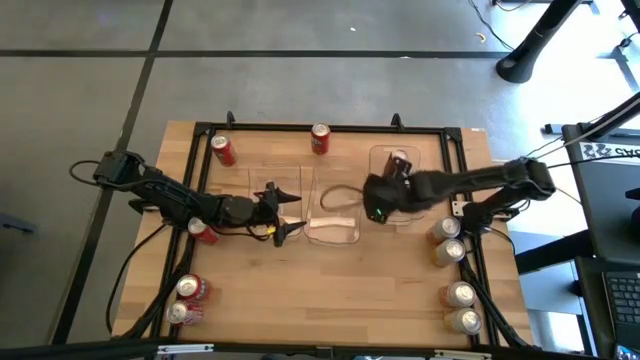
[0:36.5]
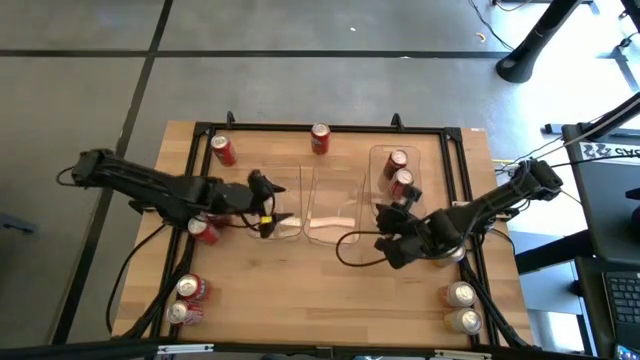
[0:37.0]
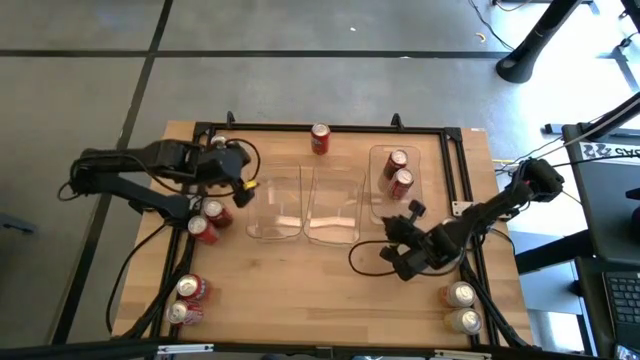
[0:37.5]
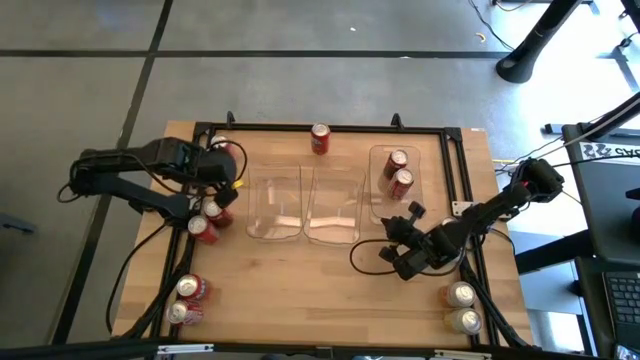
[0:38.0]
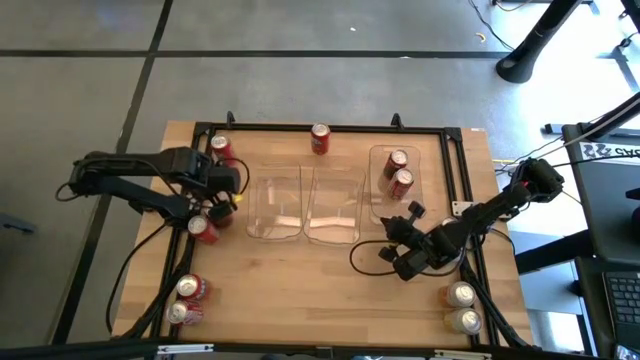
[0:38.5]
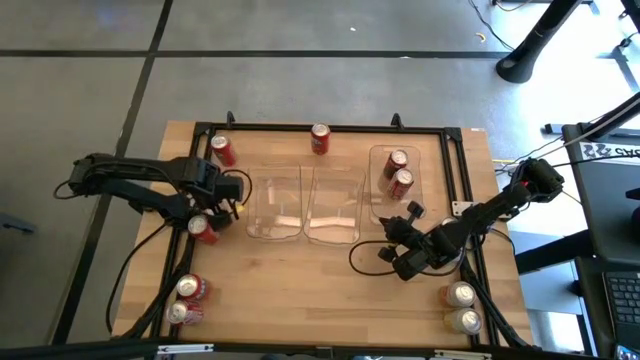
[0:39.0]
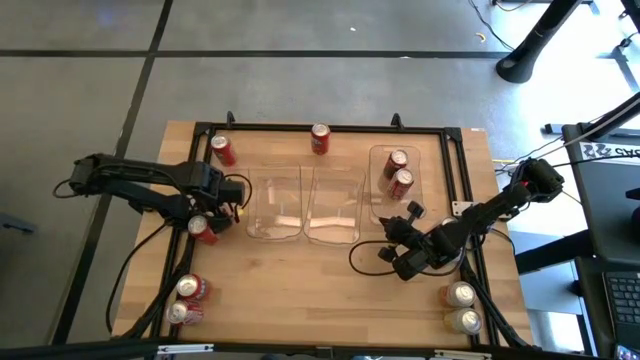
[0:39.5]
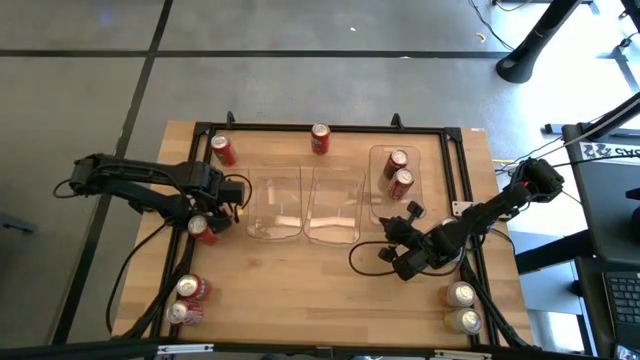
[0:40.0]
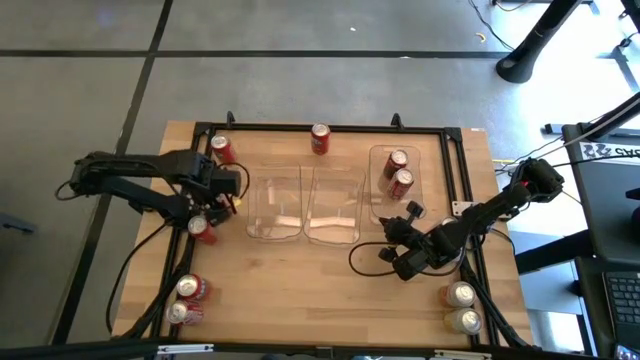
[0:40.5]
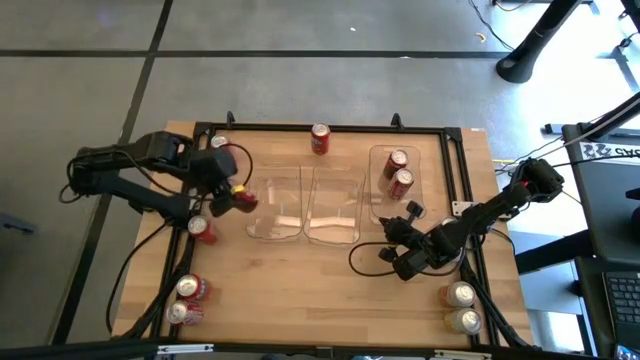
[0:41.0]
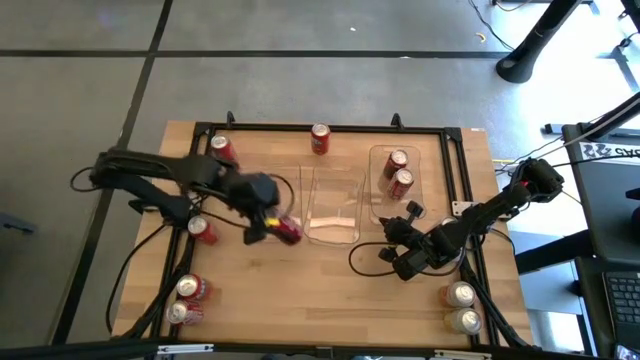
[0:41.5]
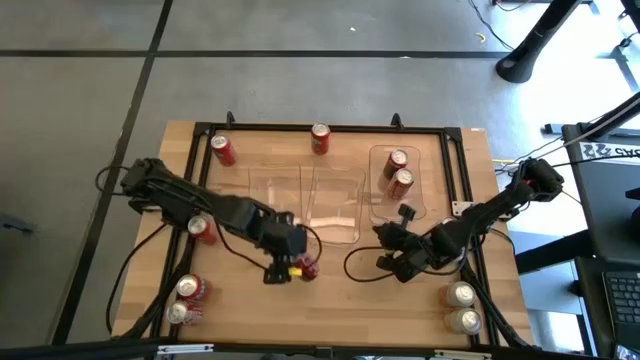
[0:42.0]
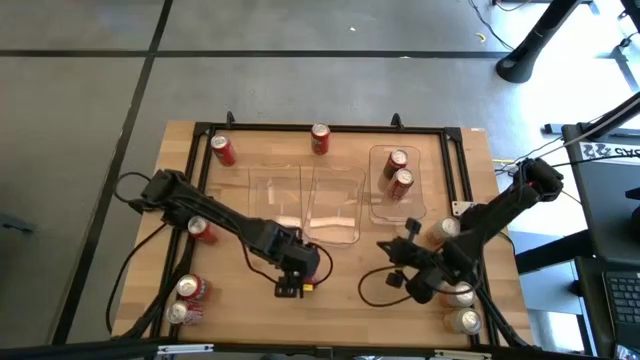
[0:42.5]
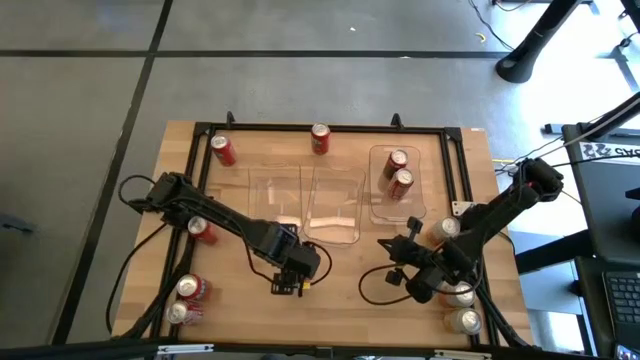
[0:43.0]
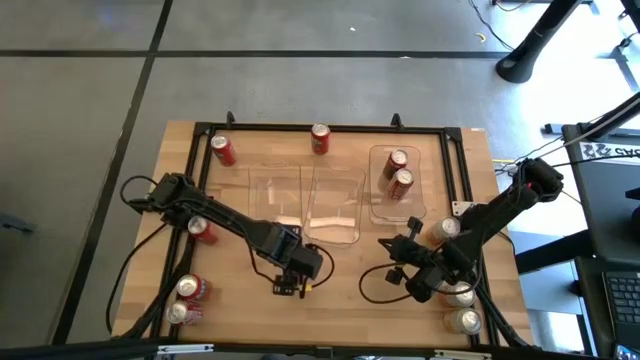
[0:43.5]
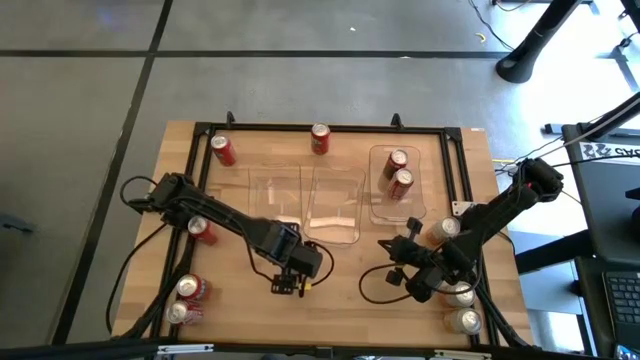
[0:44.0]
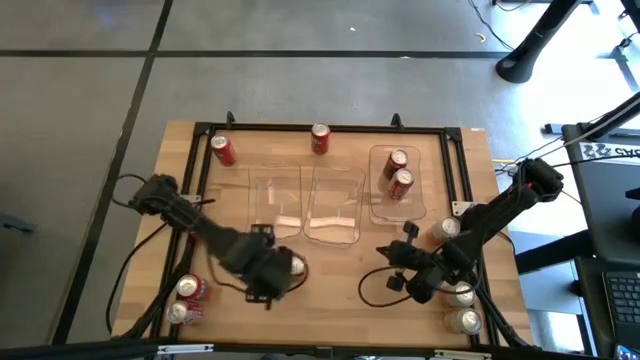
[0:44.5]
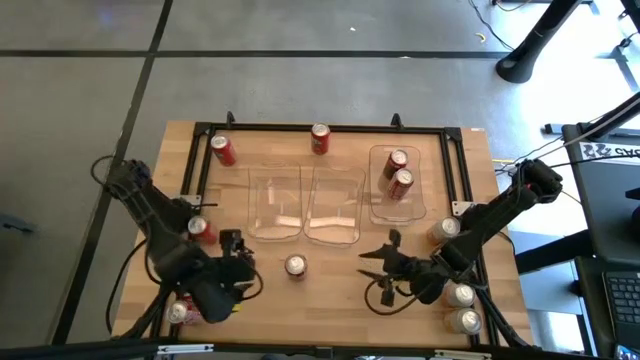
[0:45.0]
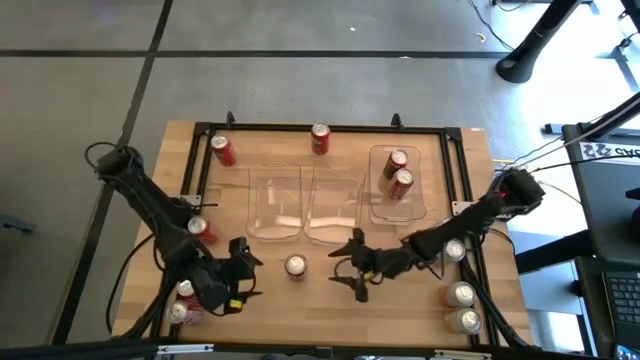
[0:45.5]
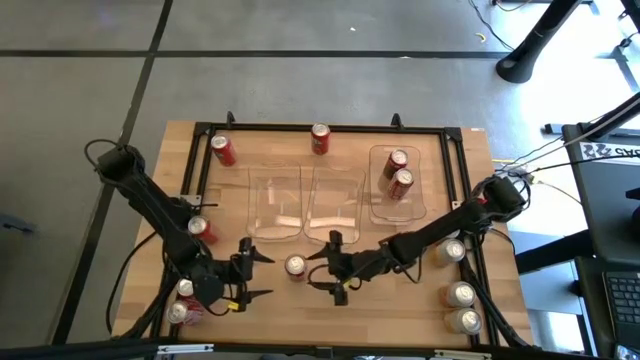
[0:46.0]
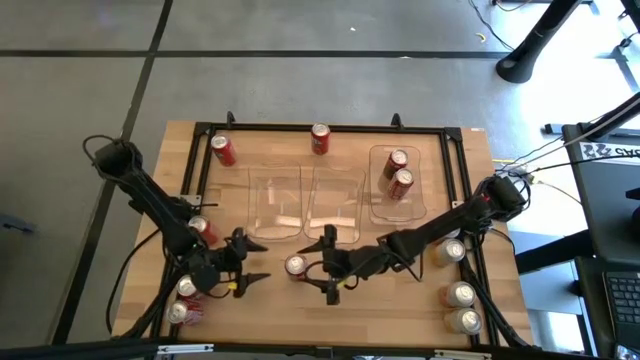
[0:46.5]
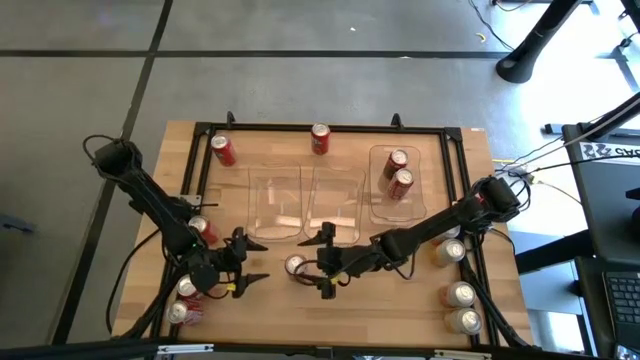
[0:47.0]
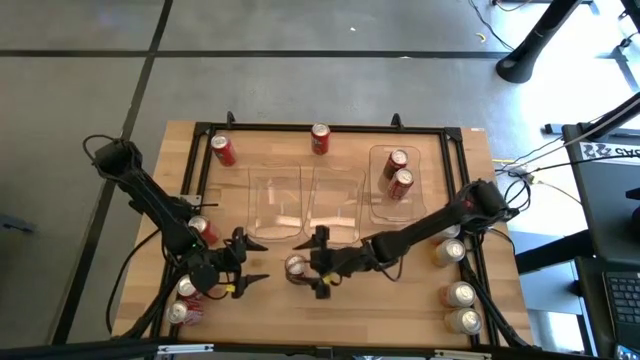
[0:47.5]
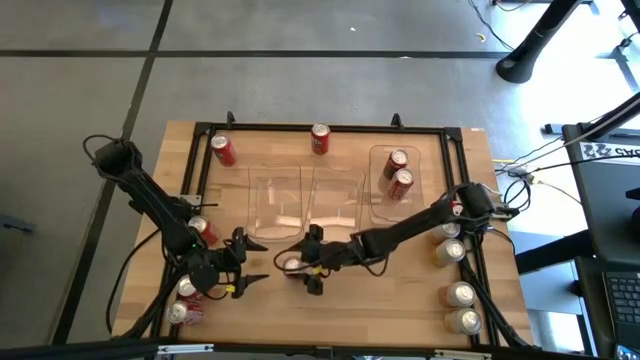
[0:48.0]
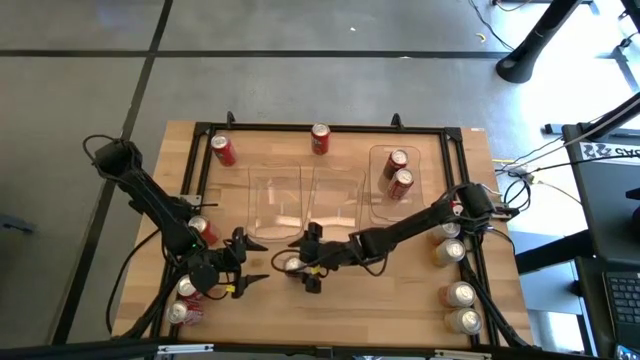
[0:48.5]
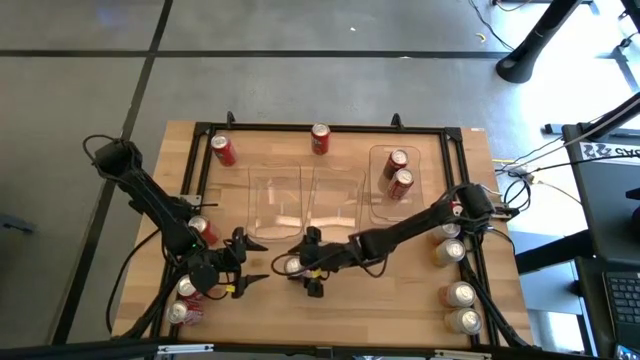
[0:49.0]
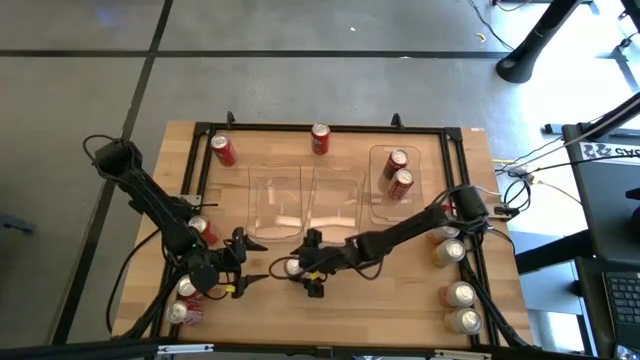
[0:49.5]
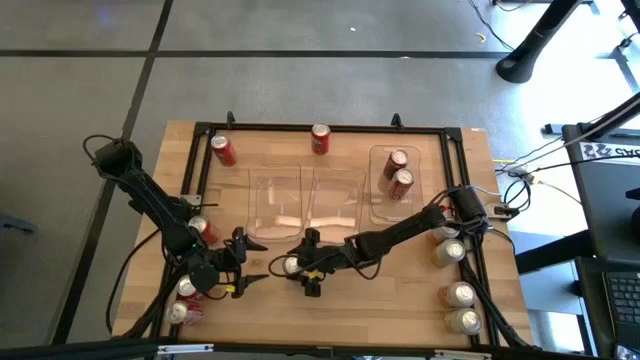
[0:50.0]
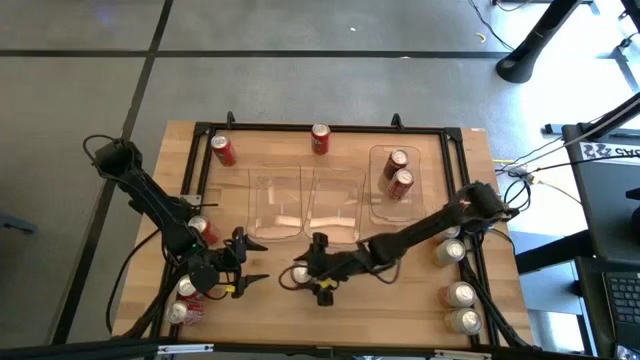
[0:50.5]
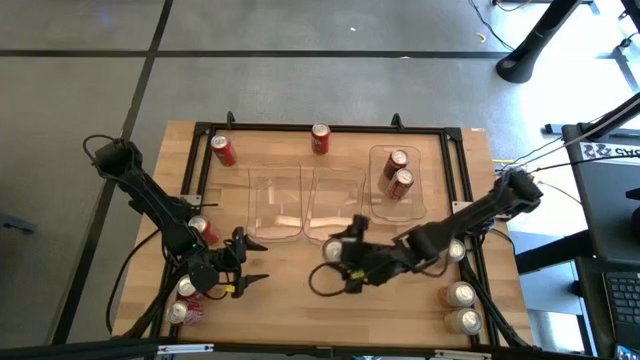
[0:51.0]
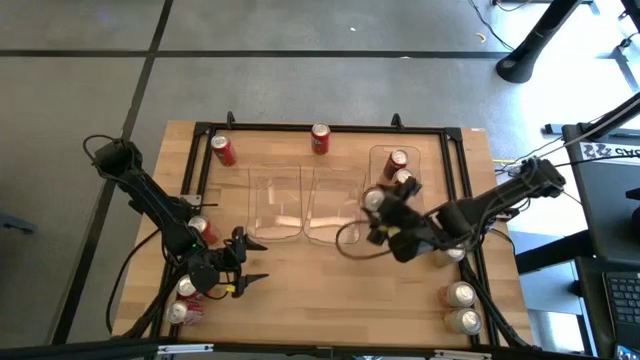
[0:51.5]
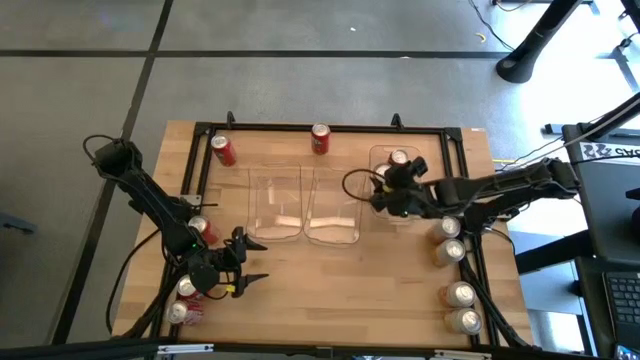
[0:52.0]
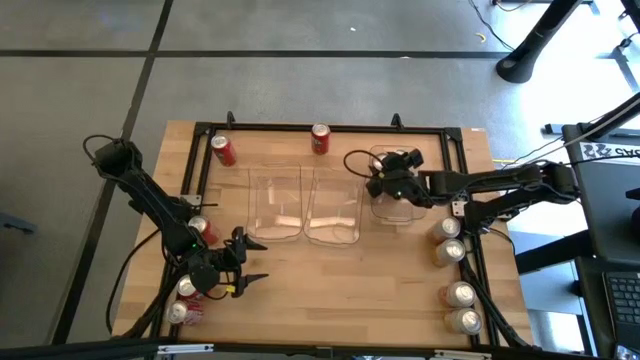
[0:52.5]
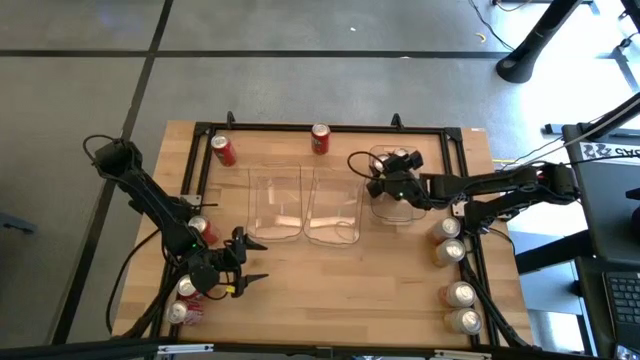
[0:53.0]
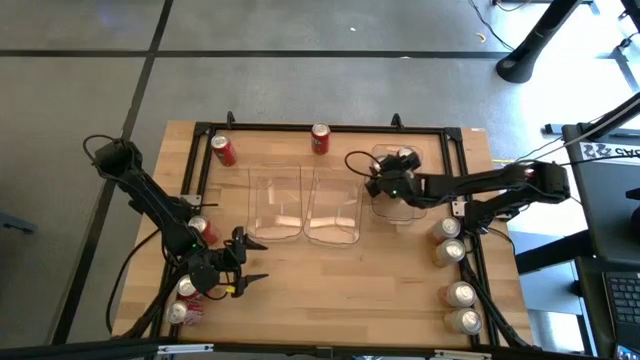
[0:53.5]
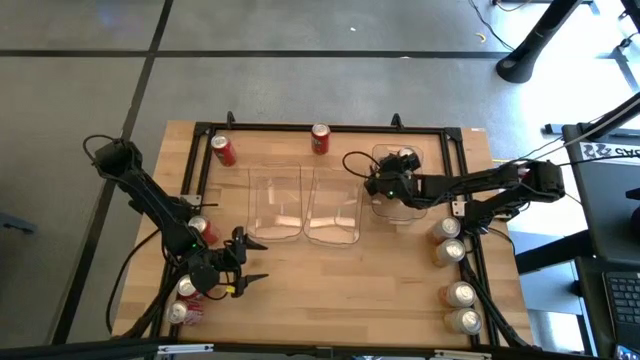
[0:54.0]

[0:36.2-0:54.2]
Task: Sort soda cans
Put the red soda can into the right transparent bin

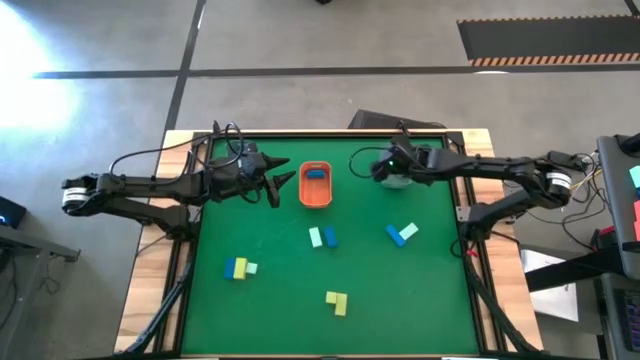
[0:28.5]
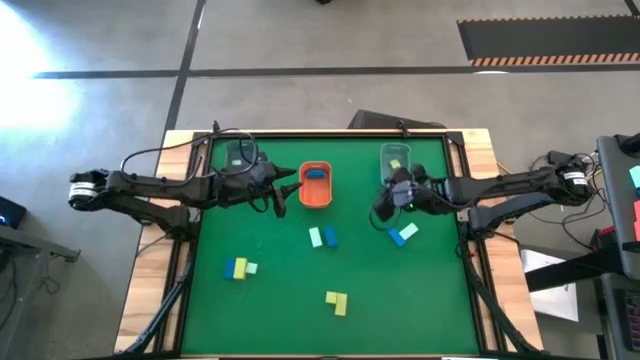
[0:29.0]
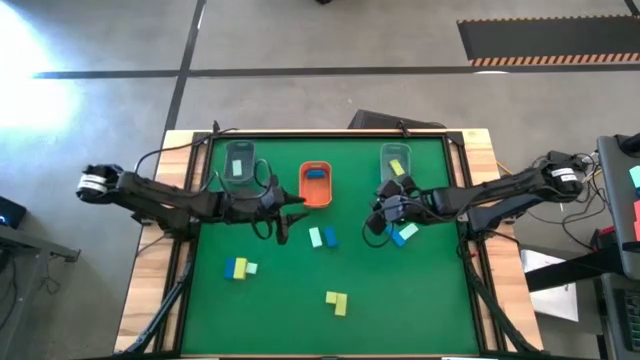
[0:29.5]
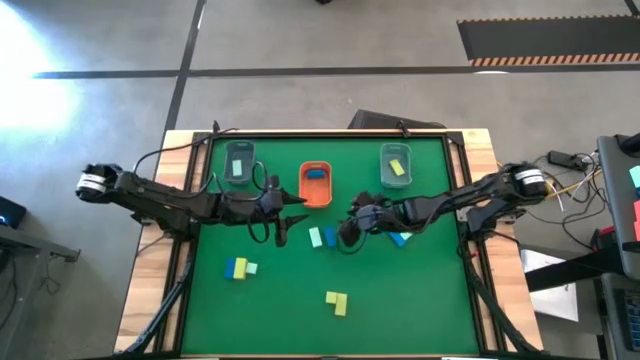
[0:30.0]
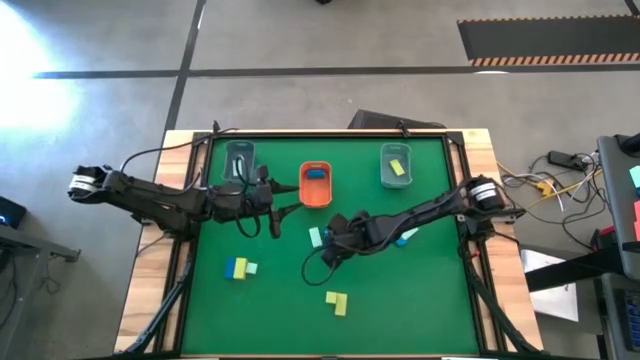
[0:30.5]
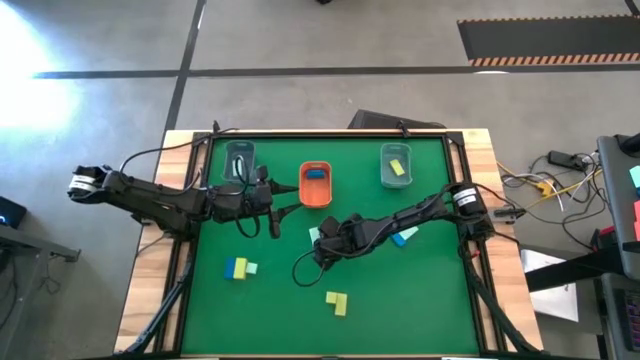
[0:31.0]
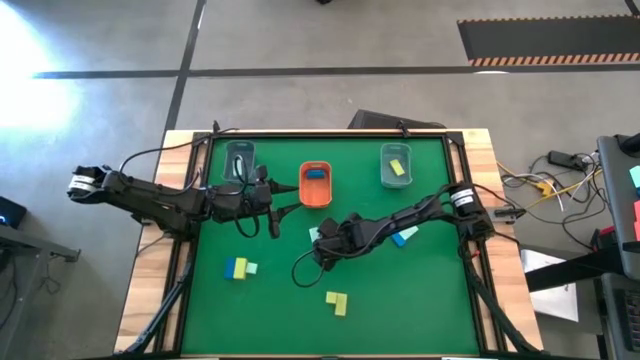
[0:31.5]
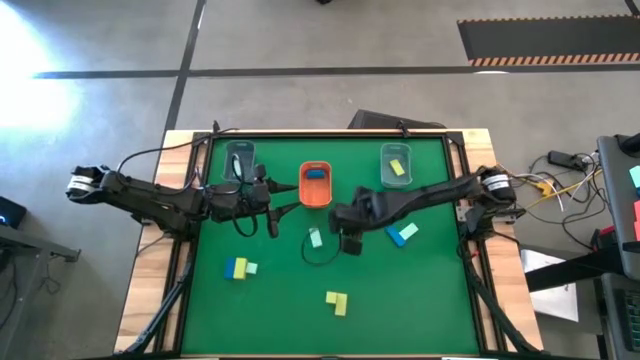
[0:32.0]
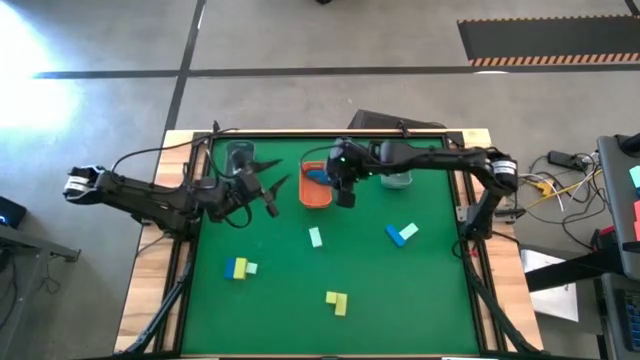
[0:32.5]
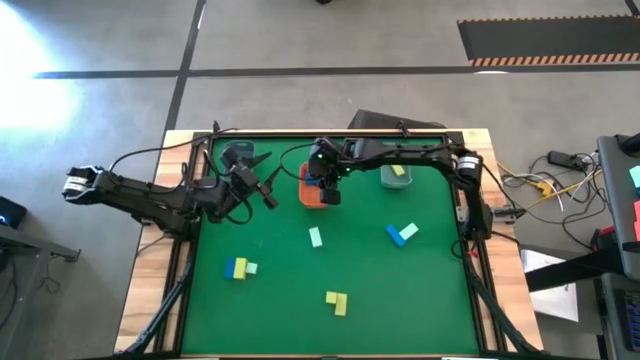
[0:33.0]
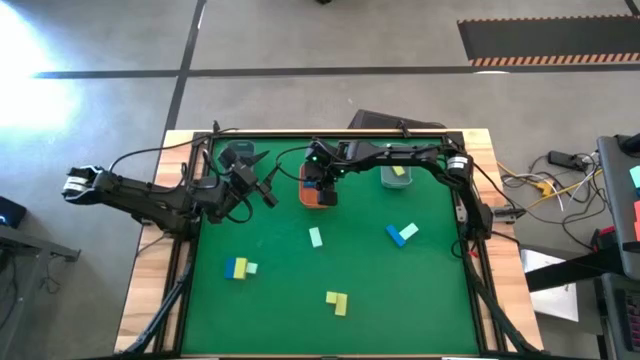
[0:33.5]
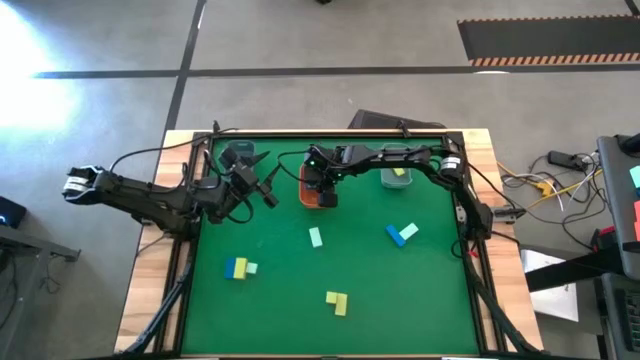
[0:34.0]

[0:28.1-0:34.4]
Task: Sort & place blocks by color
Put the dark blue block into the orange bin
